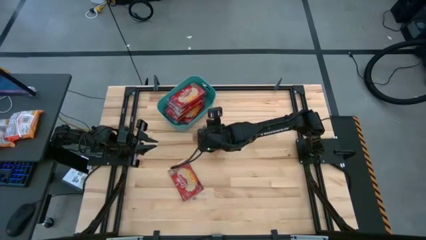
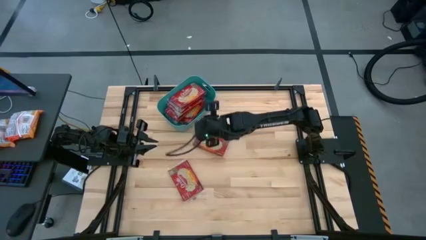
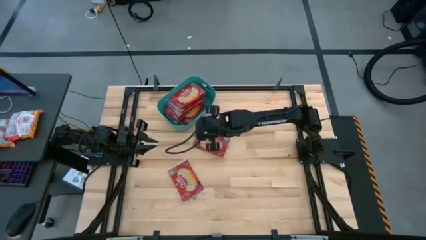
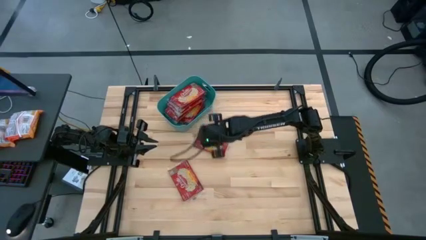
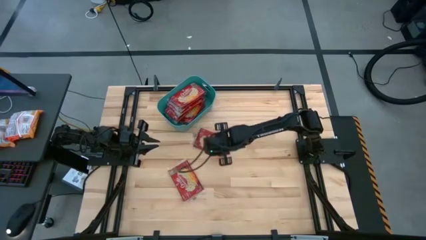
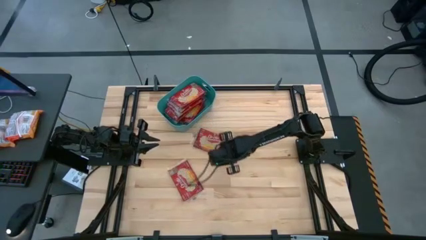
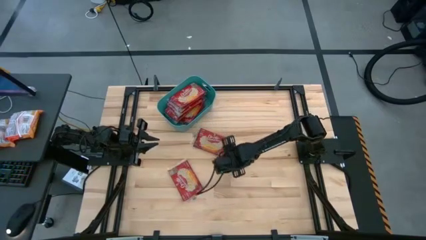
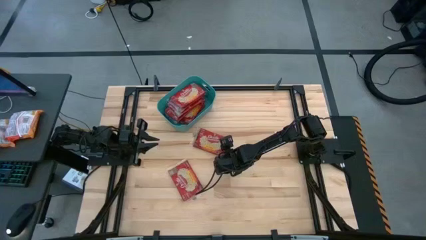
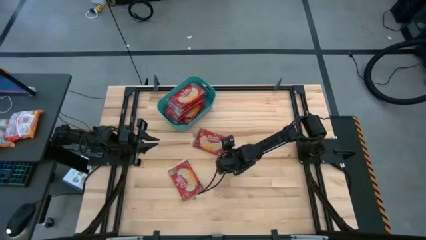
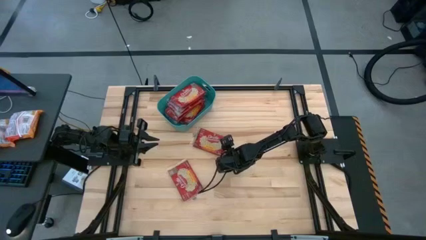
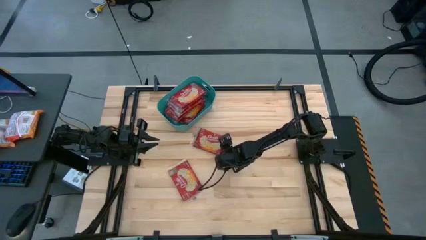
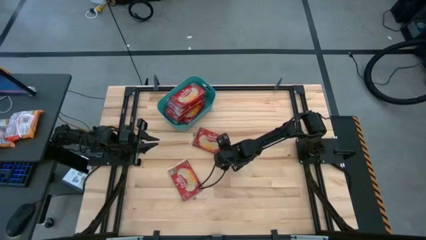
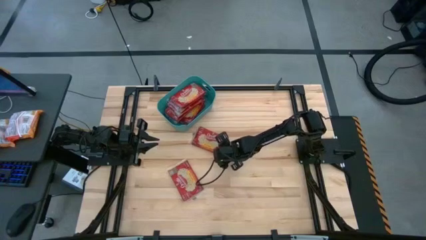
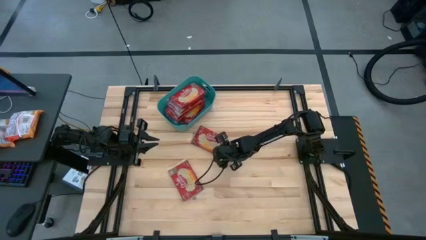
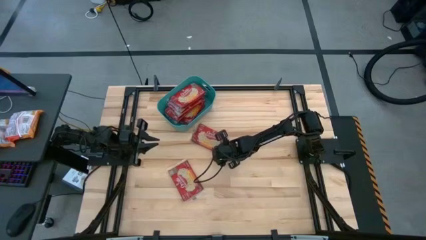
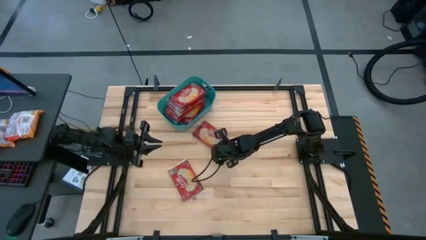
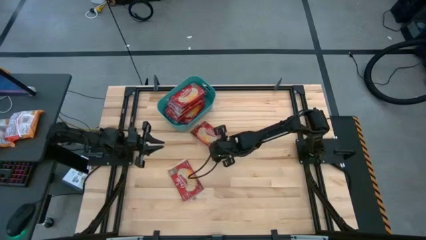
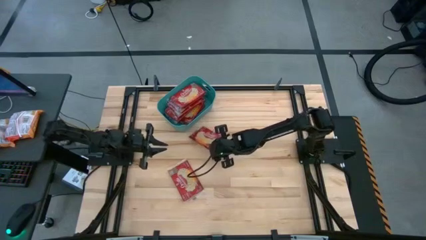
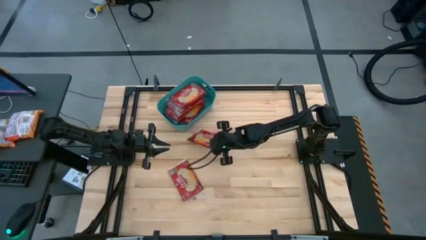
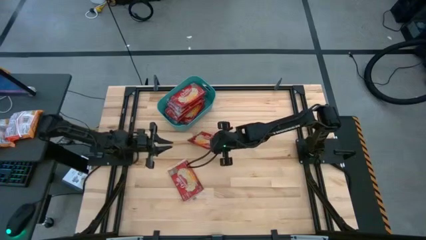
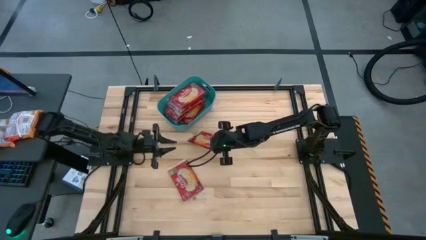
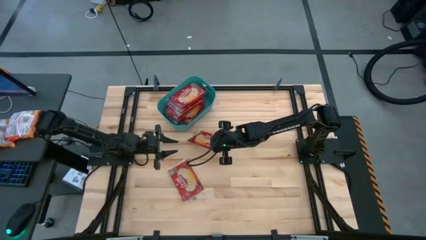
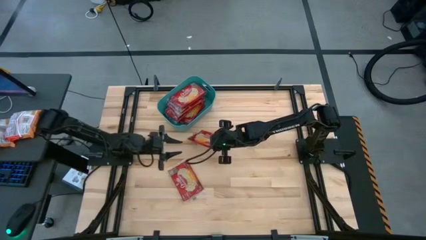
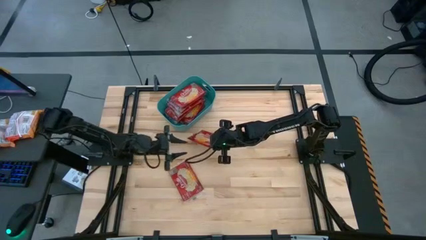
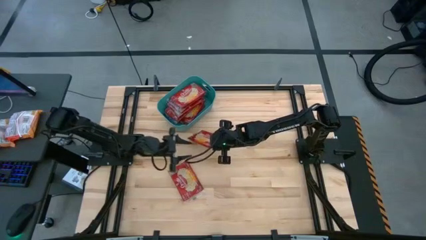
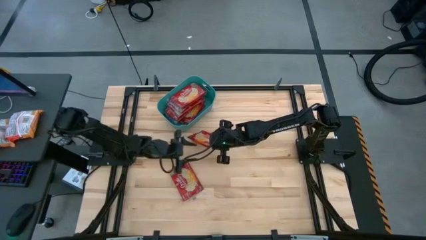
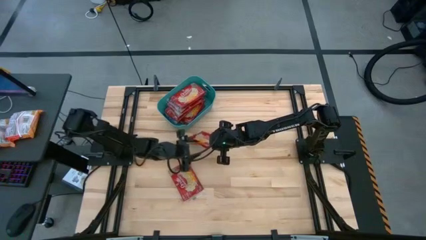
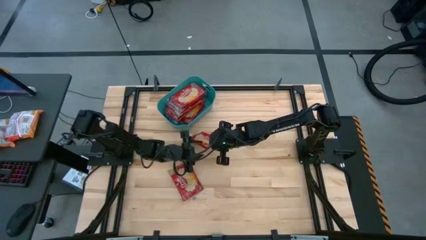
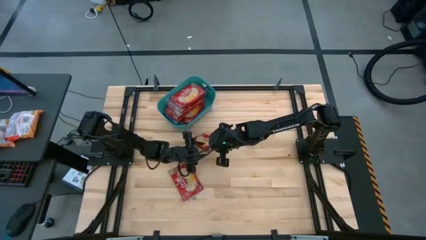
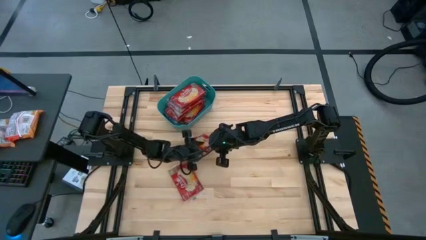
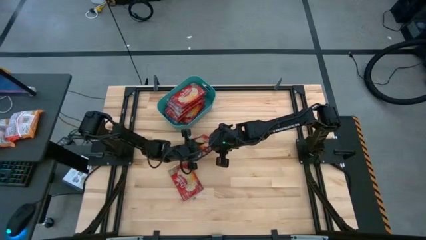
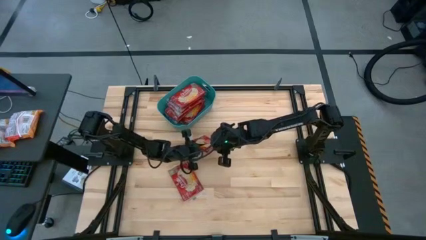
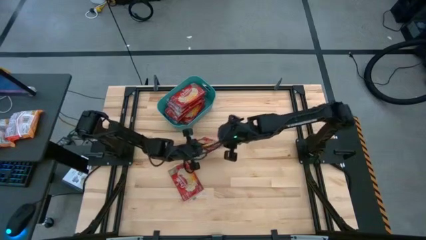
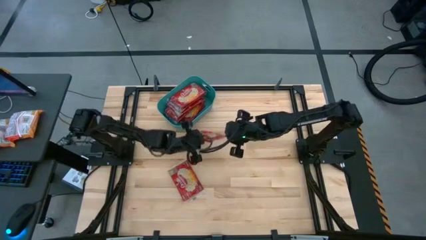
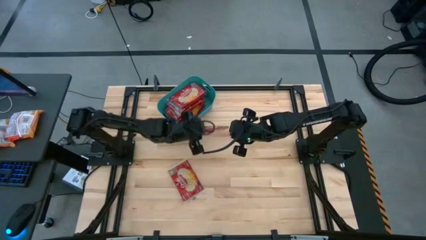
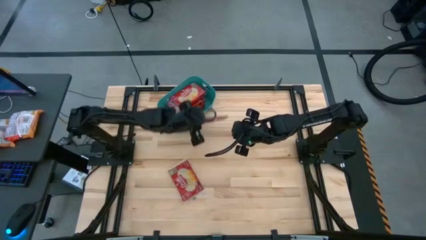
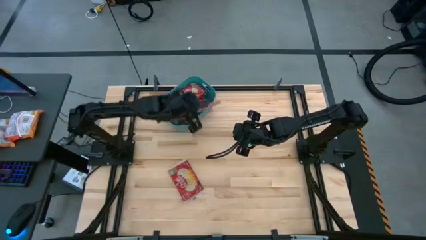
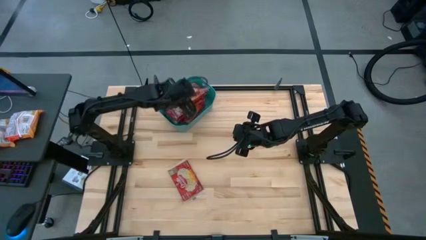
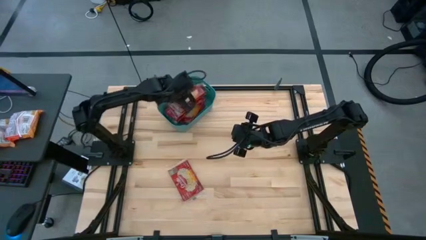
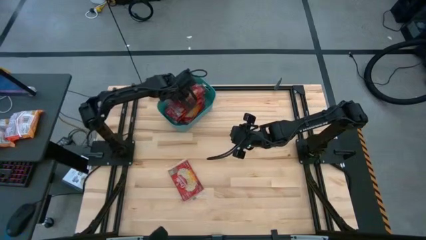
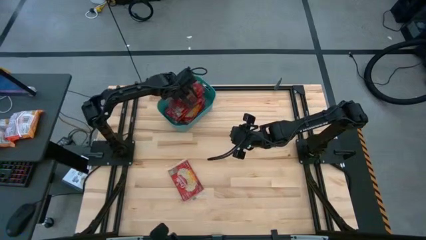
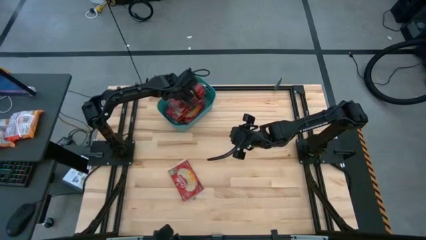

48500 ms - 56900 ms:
Task: Sort popcorn bags into baskets
Put the red popcorn bag into the green bin

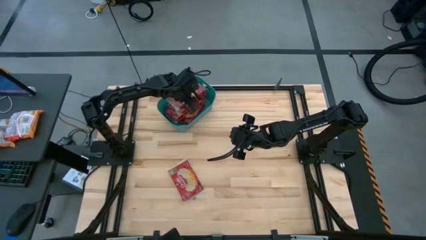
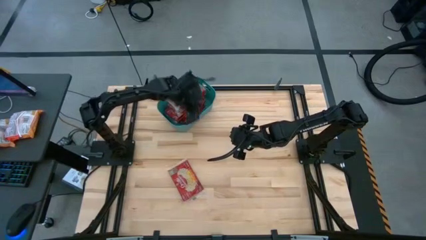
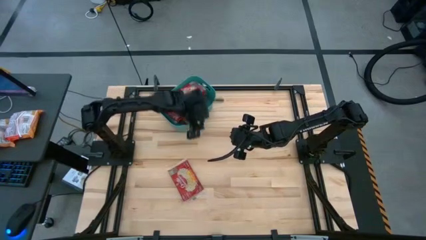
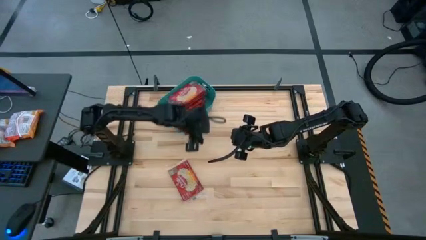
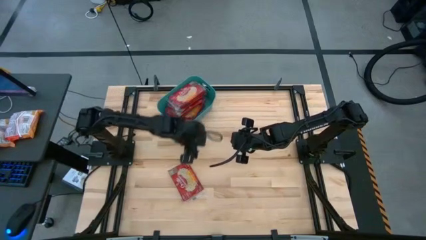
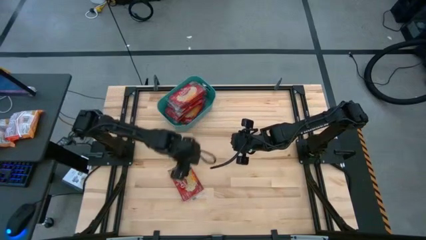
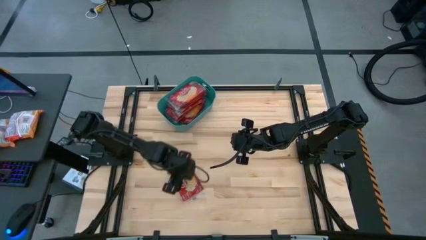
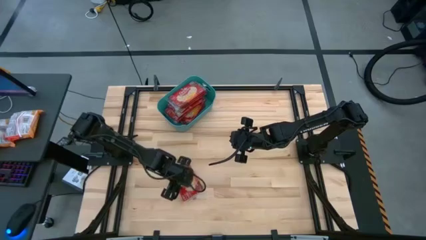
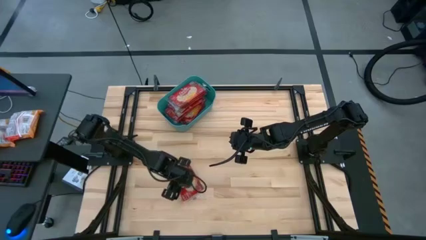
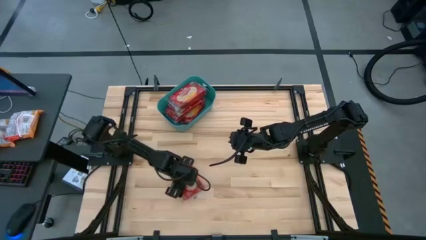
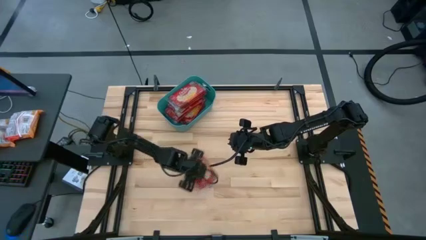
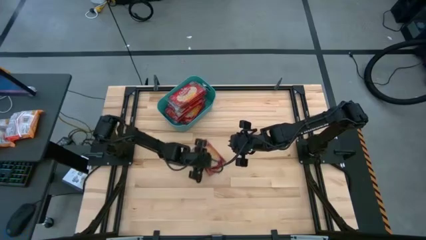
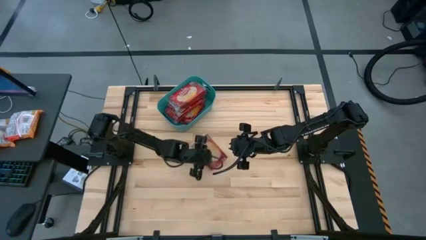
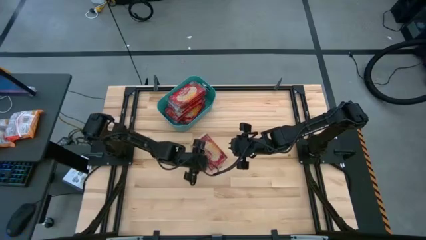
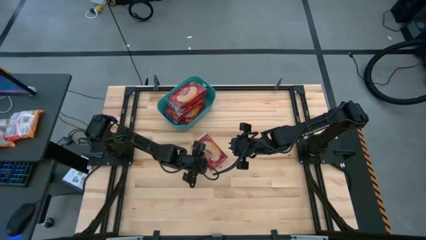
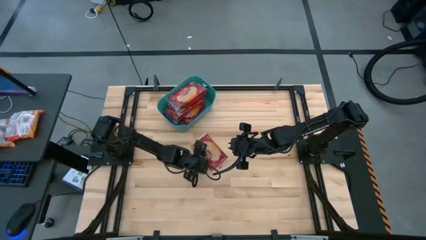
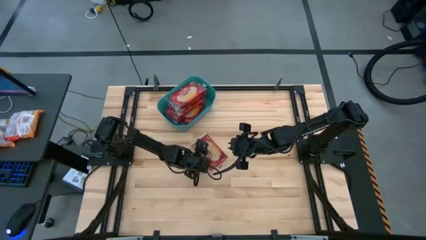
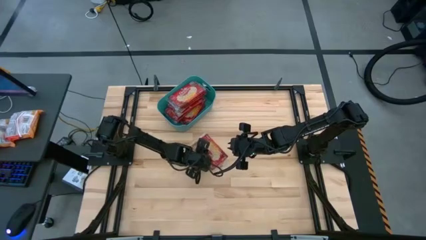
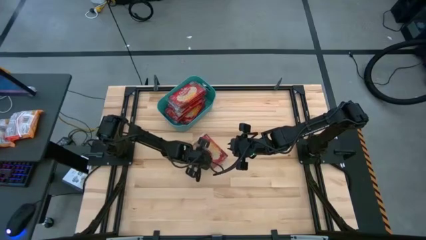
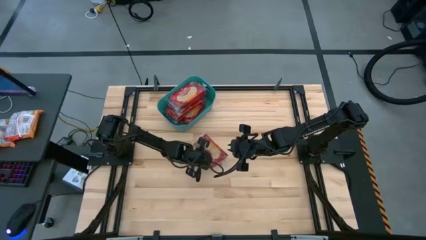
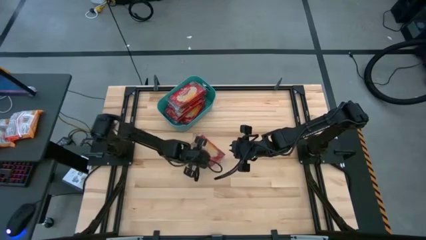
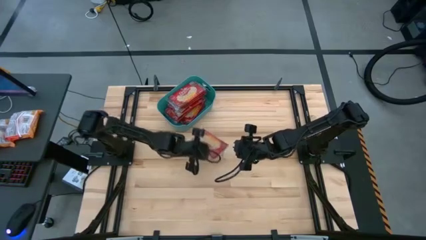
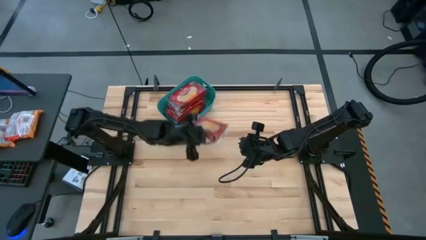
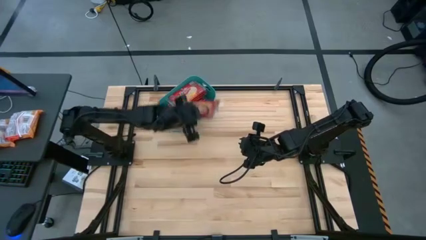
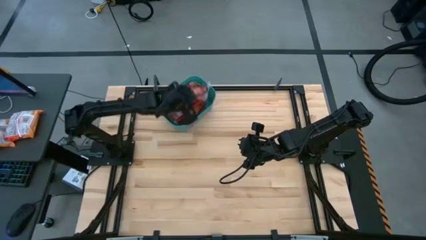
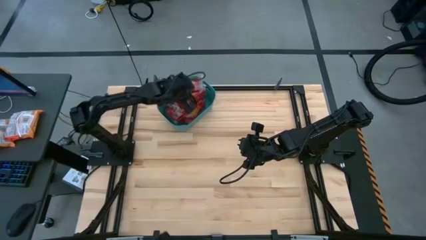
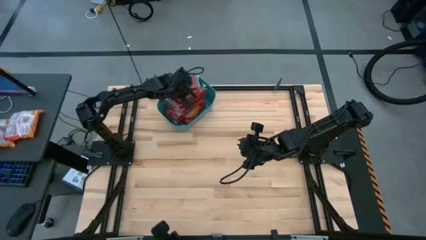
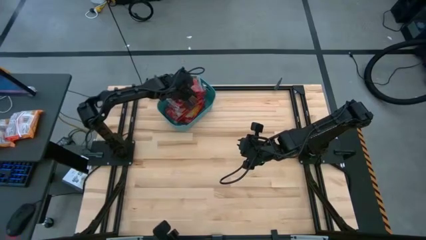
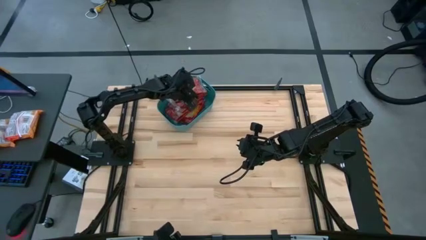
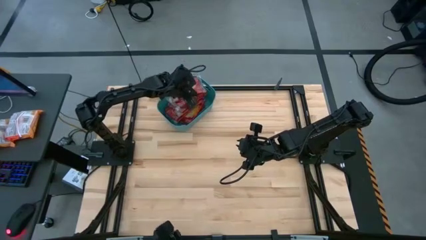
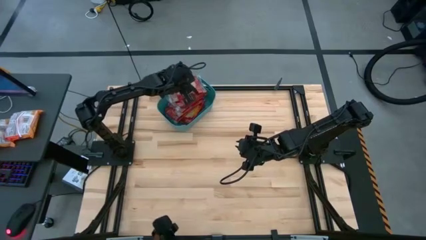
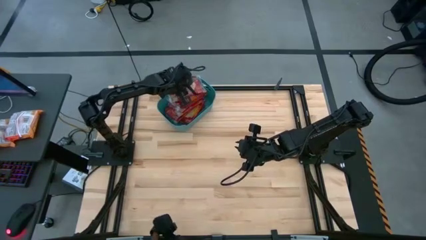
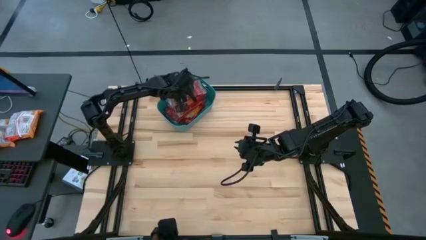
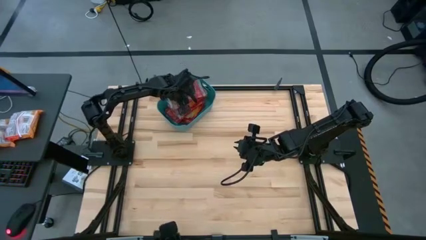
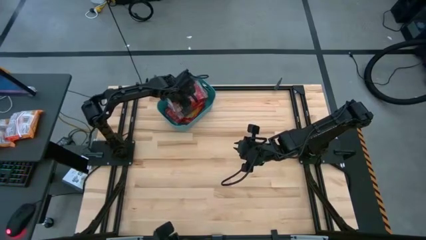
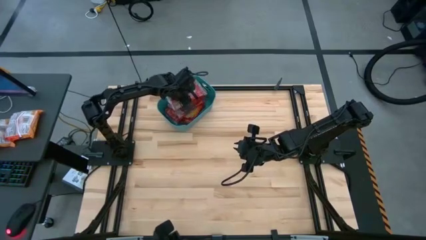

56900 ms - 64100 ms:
Put the red popcorn bag into the green bin

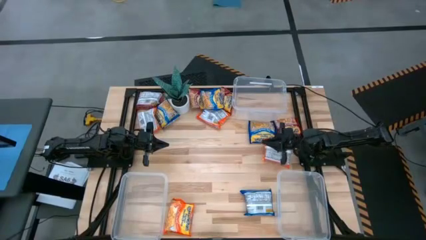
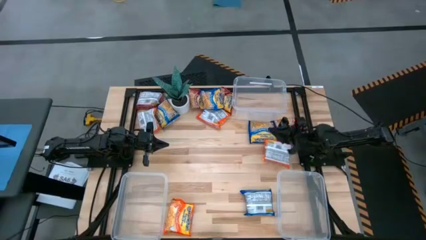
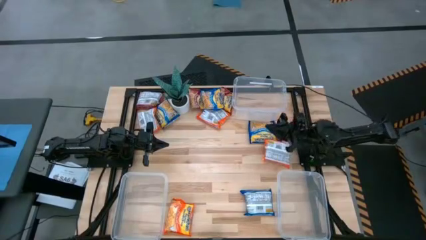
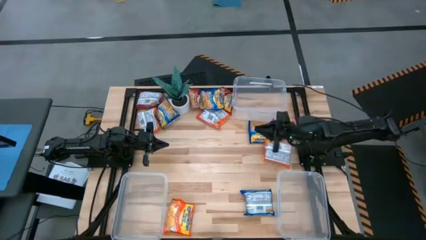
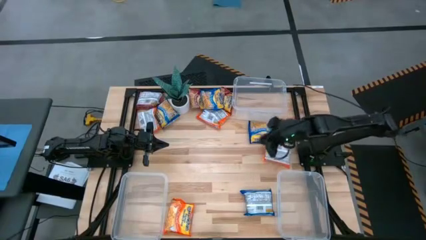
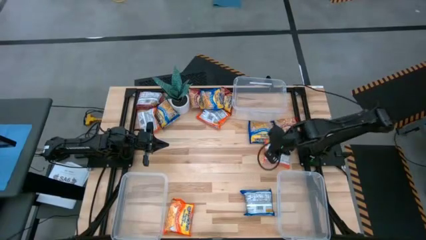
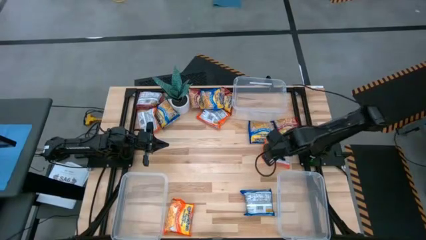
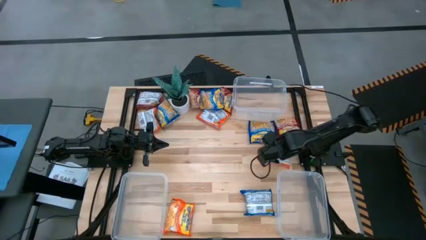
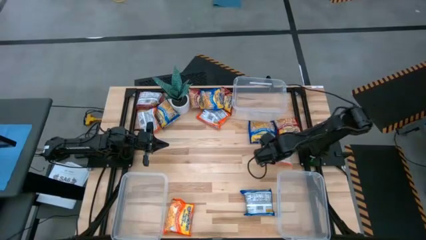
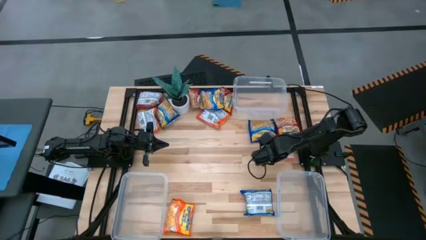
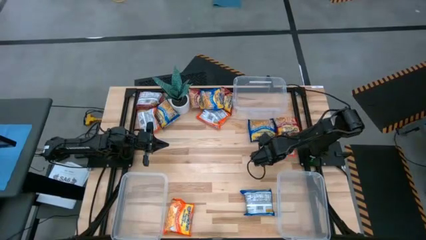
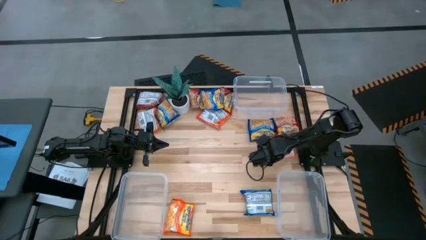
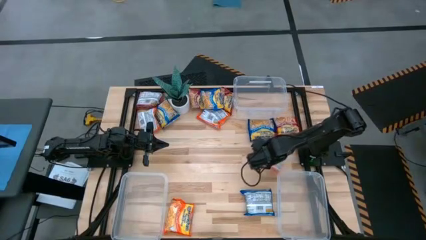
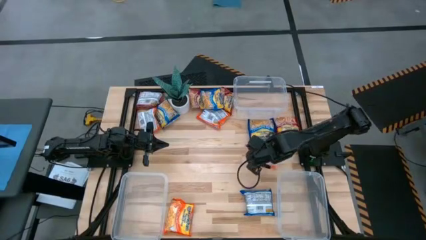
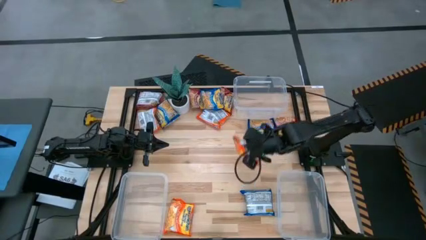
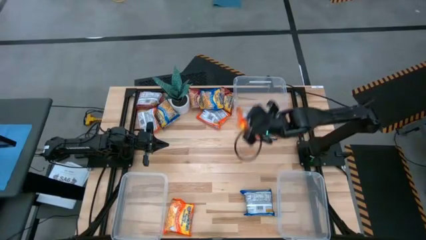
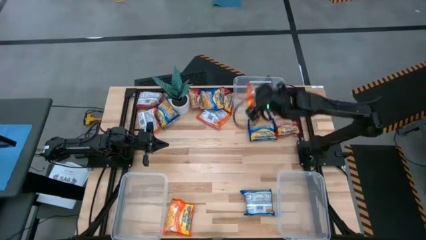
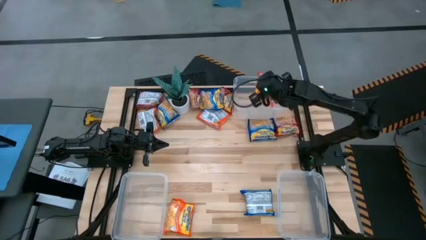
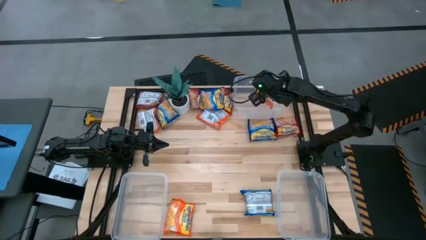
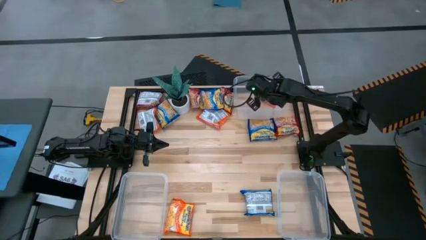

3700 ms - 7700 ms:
Task: Sort Maruchan noodles
Put the orange noodle pack into the top transparent bin
